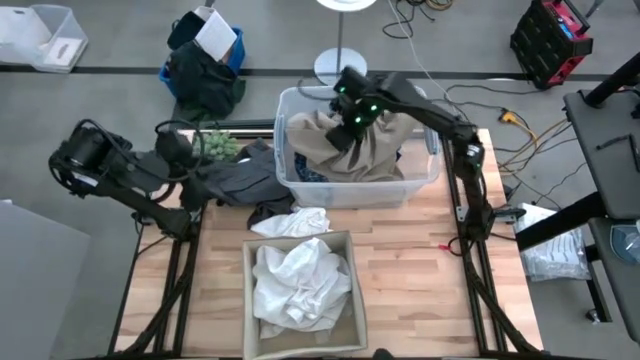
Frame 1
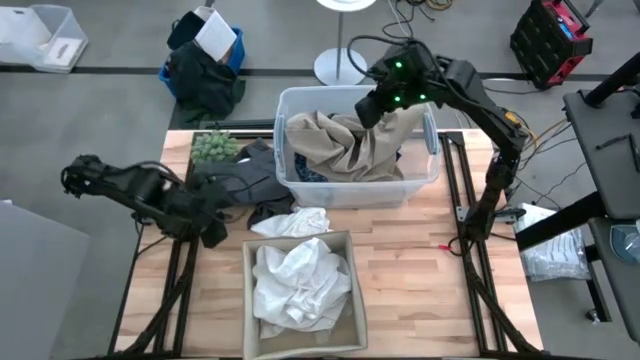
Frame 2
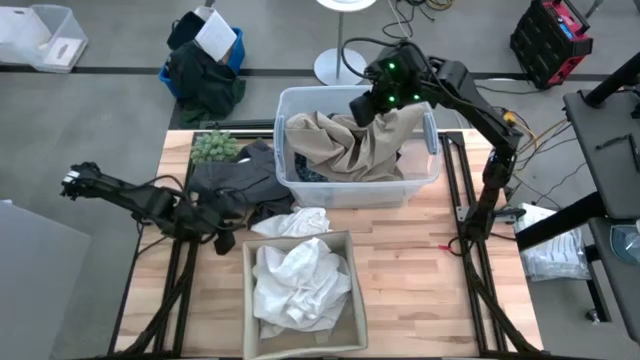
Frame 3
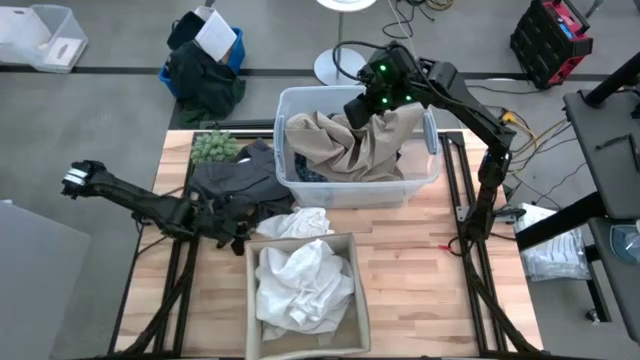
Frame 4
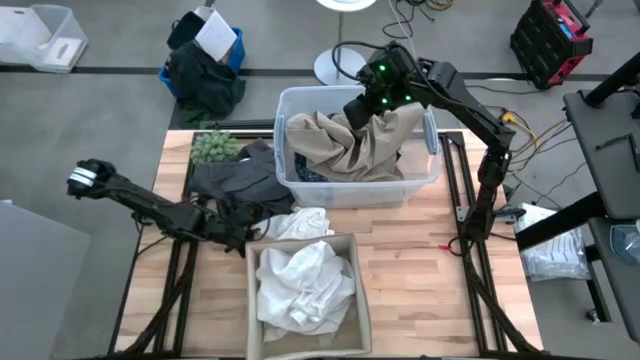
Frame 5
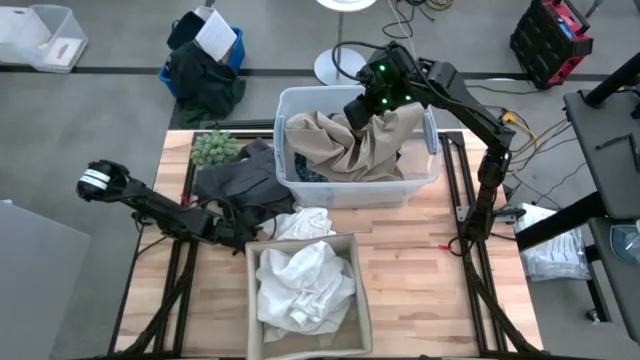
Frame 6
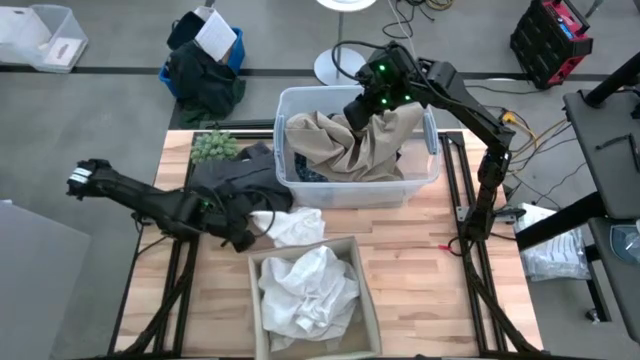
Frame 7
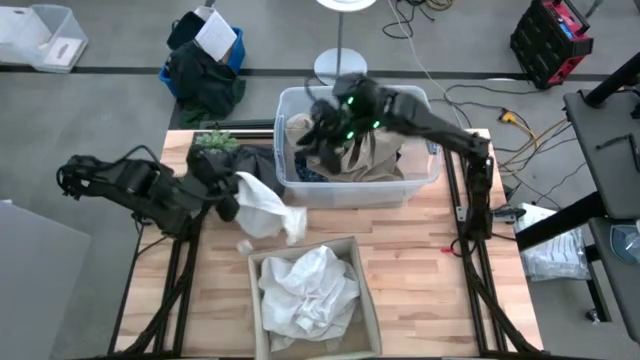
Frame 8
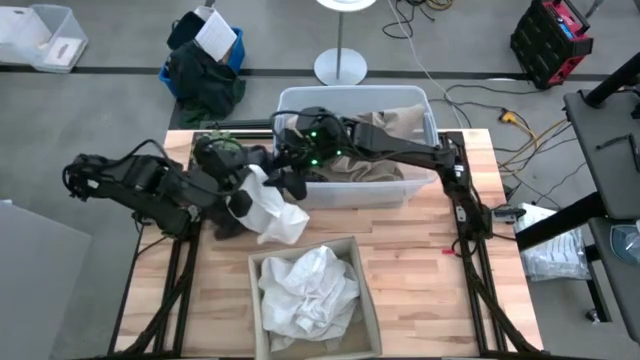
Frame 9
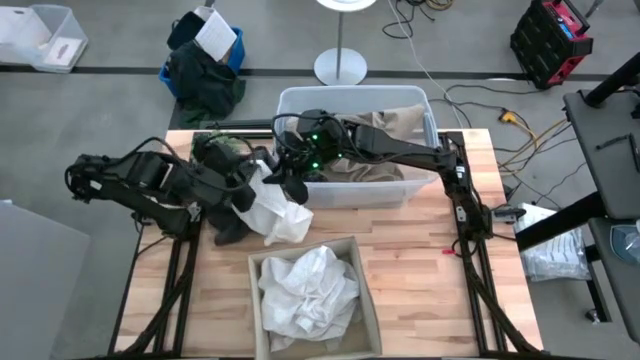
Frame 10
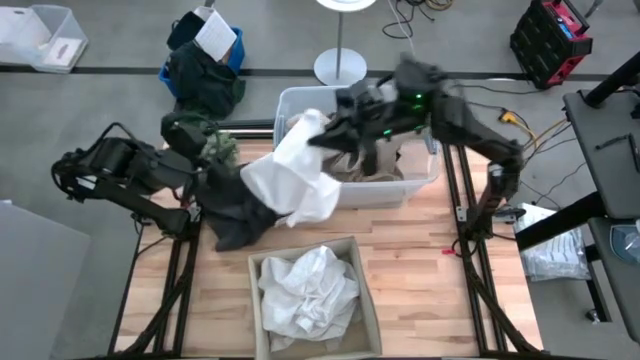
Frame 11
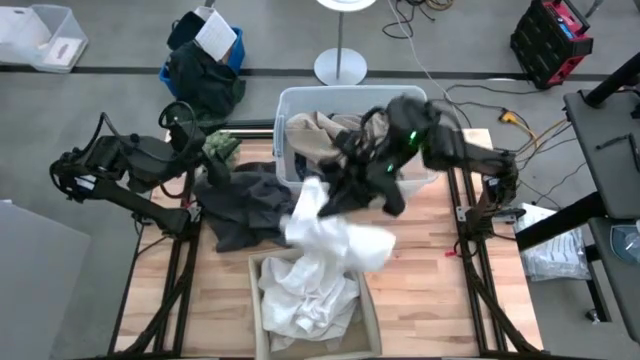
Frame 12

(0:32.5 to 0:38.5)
Task: Sort clothes
Put the white shorts into the laundry organizer

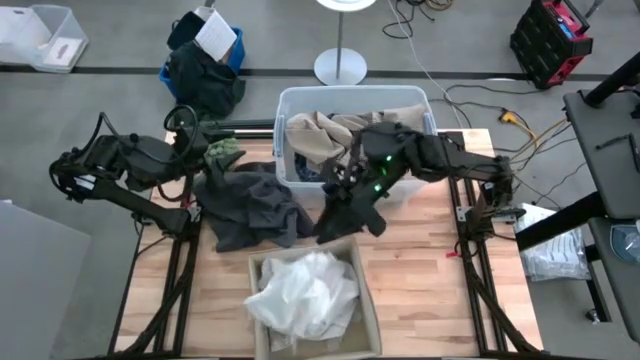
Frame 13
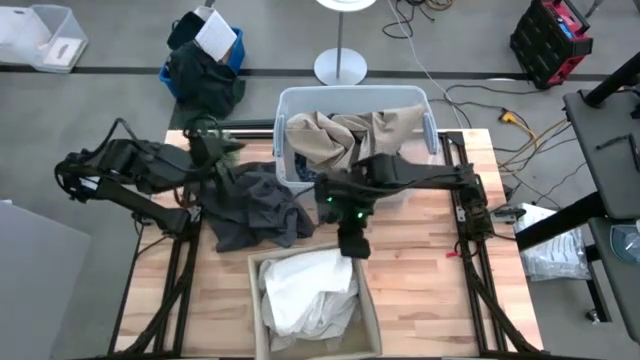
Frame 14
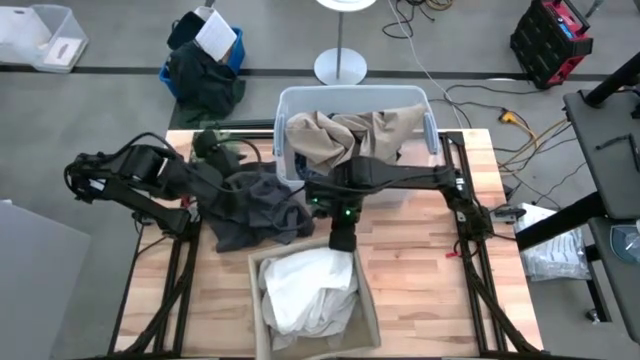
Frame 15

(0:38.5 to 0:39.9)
Adjust the laundry organizer

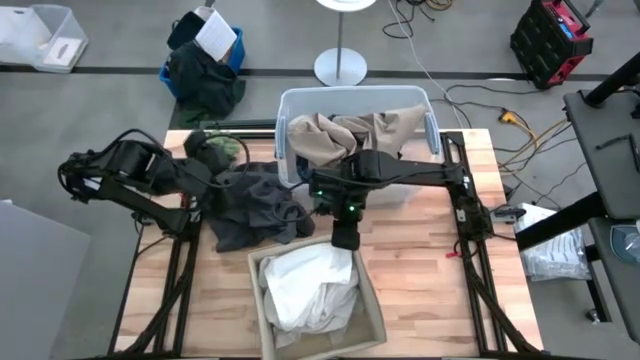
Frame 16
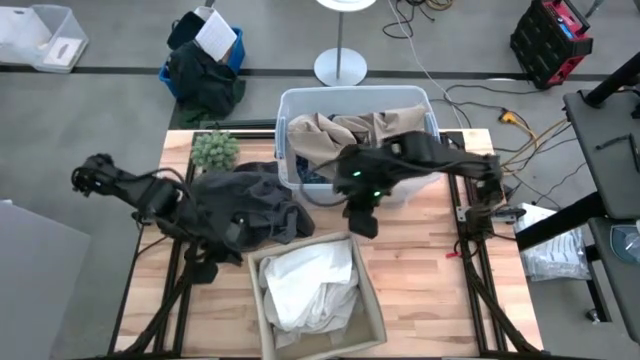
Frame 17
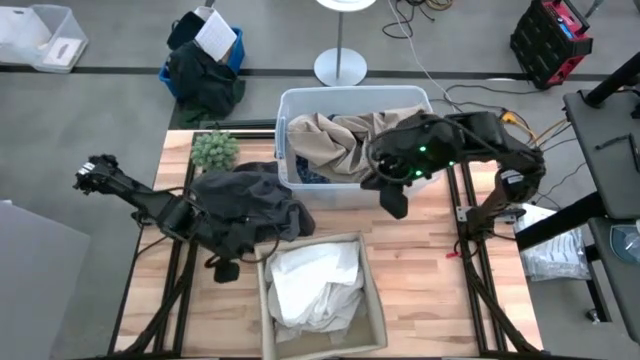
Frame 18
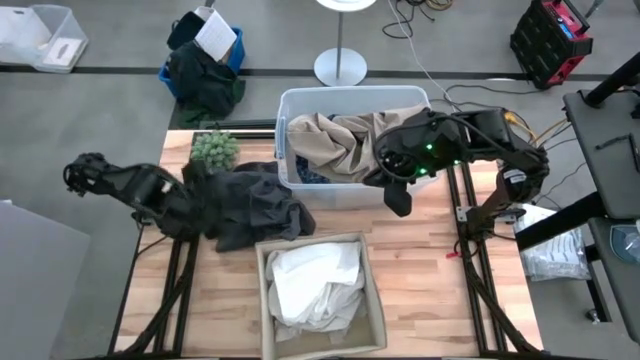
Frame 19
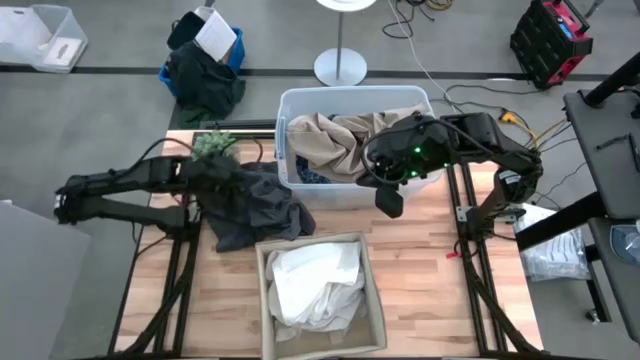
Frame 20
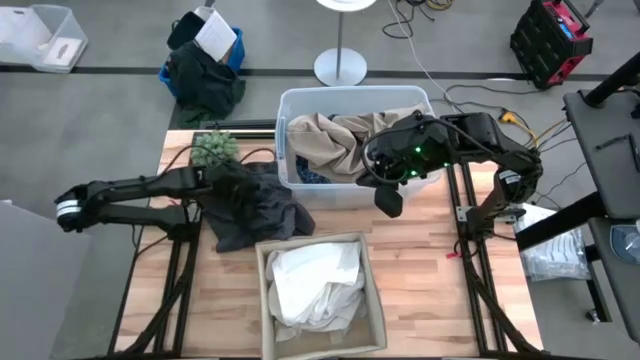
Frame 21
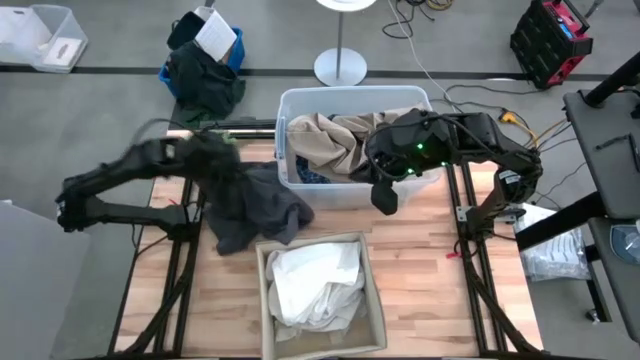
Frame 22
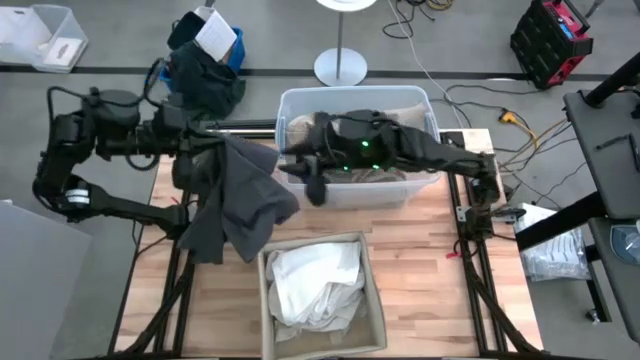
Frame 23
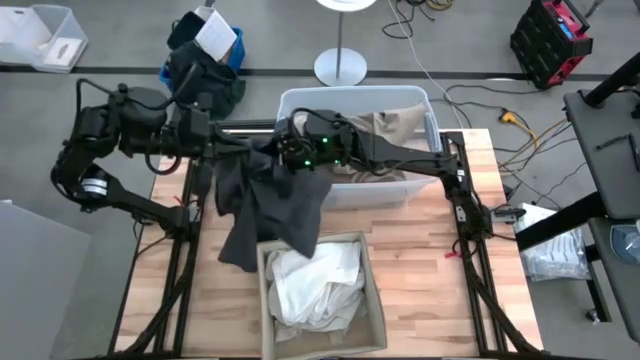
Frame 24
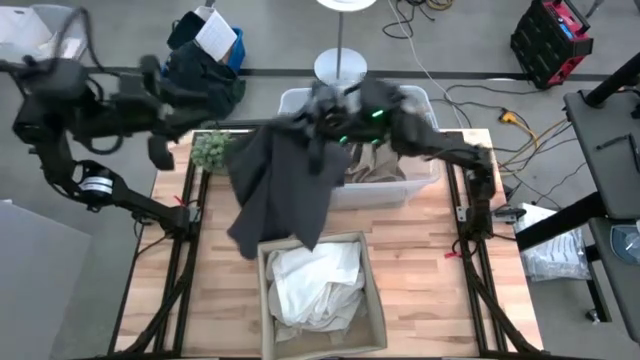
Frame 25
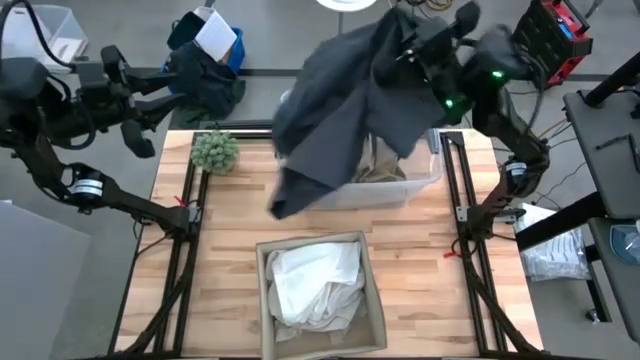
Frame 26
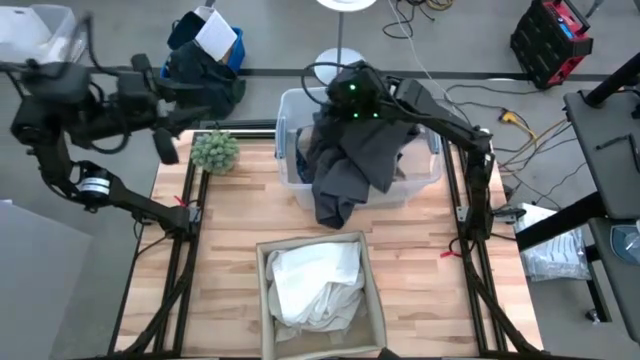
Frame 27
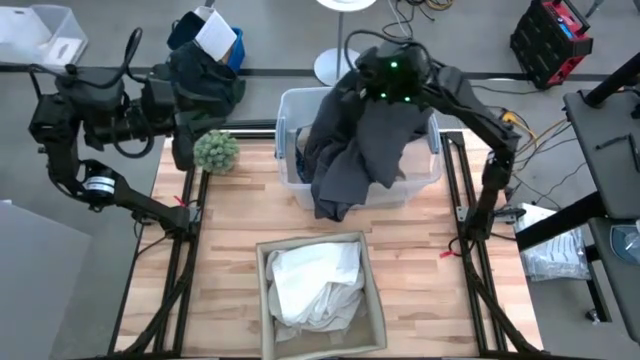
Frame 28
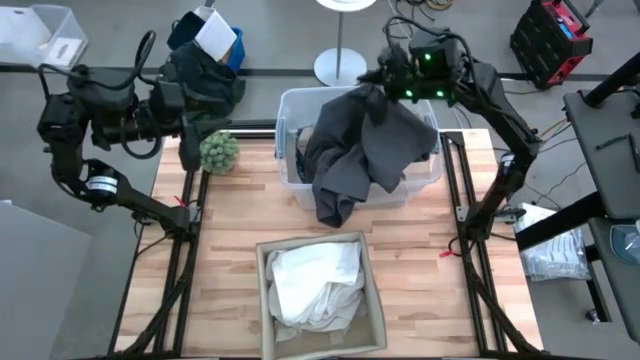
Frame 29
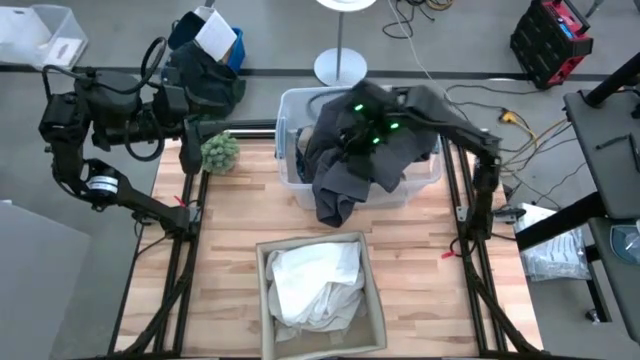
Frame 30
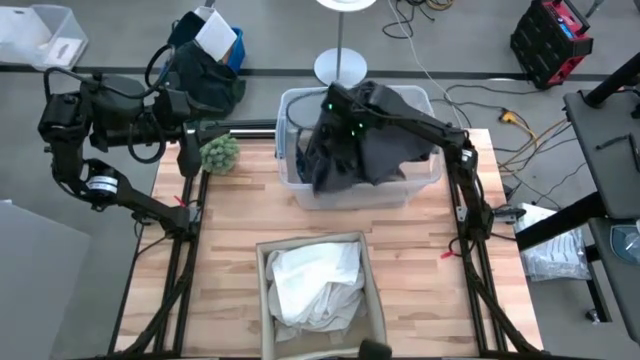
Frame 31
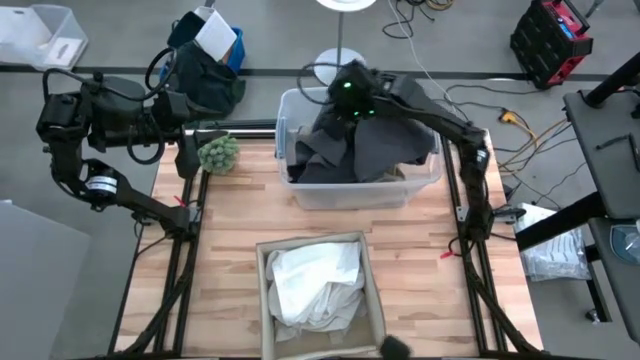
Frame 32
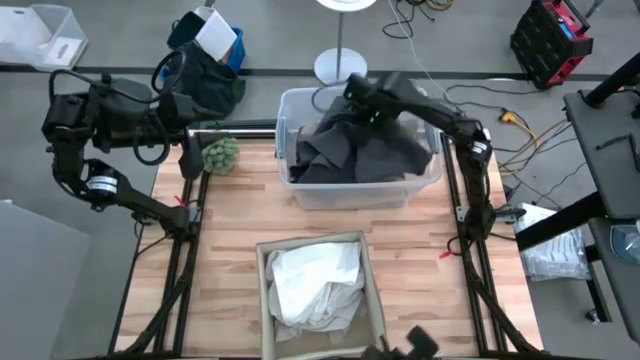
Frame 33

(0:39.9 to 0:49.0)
Put the gray shorts into the transparent bin

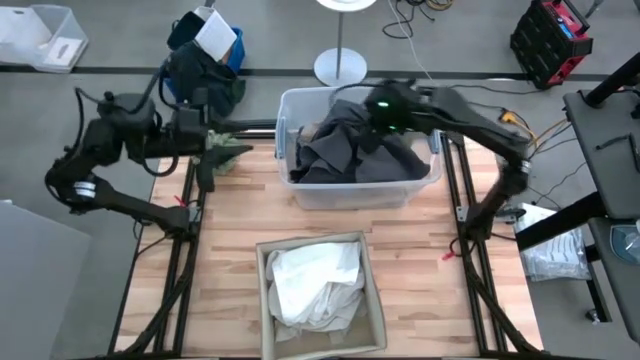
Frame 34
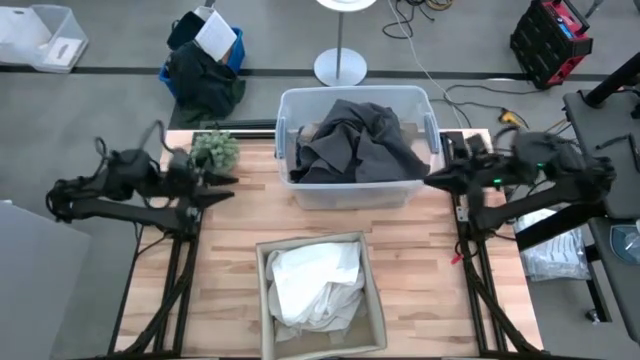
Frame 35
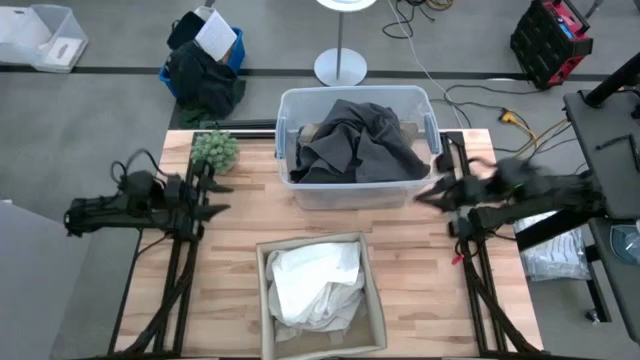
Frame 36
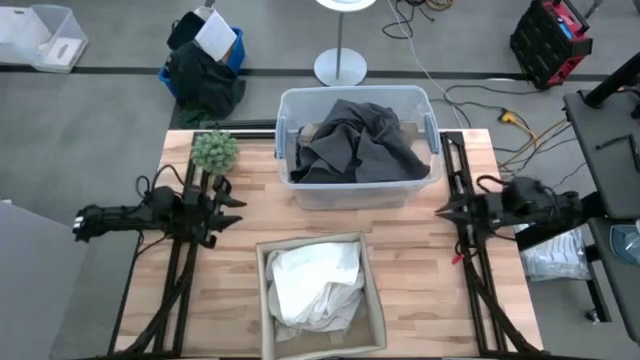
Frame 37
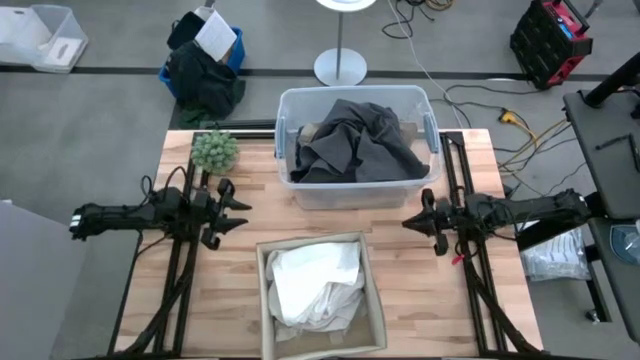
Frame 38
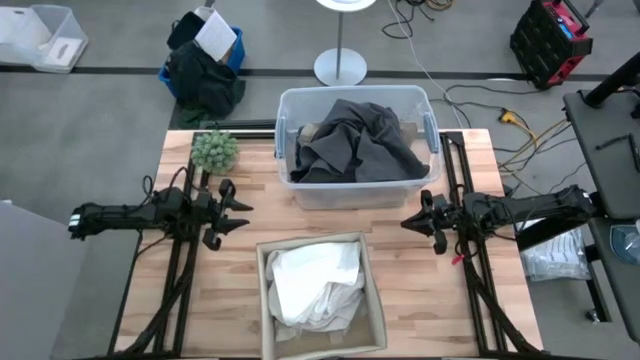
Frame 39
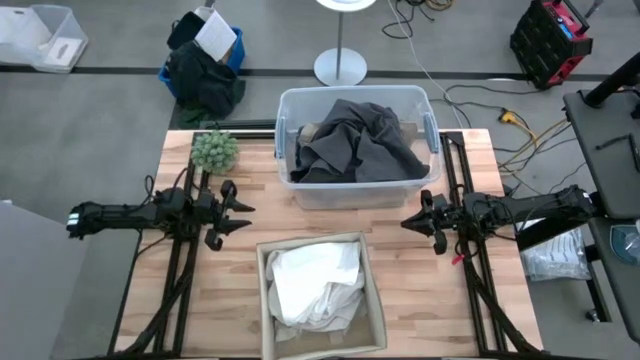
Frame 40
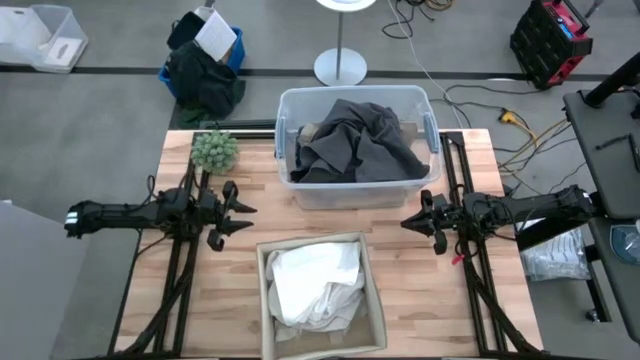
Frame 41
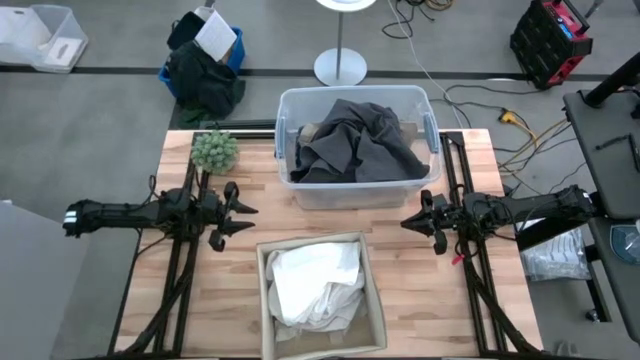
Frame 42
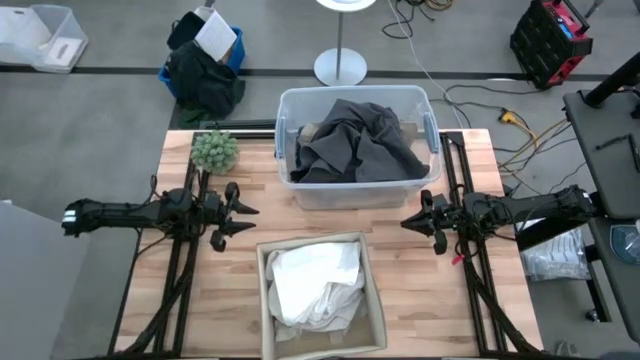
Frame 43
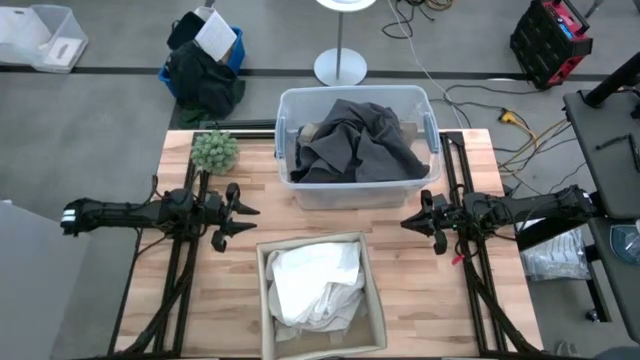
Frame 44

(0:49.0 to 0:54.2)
Return to Home Position
